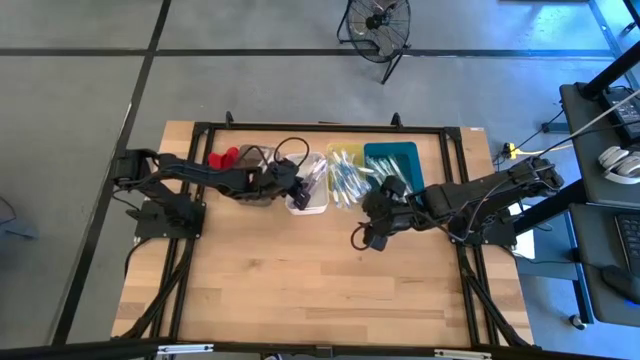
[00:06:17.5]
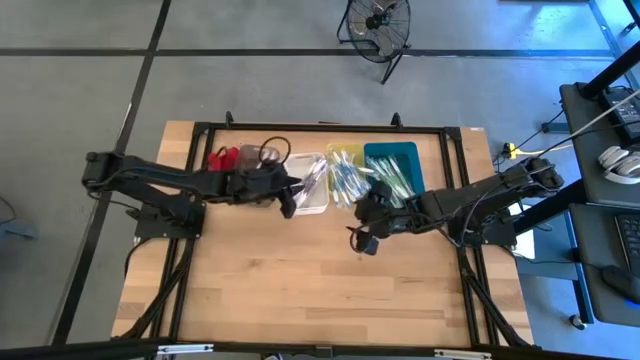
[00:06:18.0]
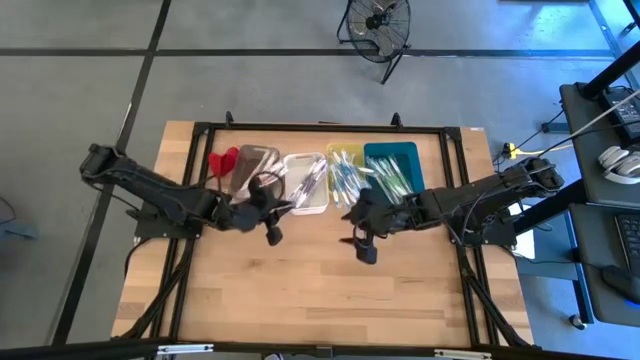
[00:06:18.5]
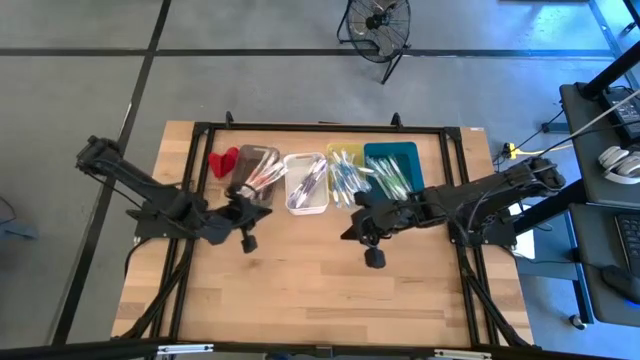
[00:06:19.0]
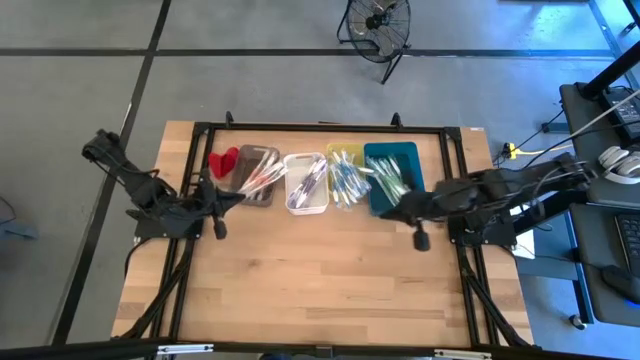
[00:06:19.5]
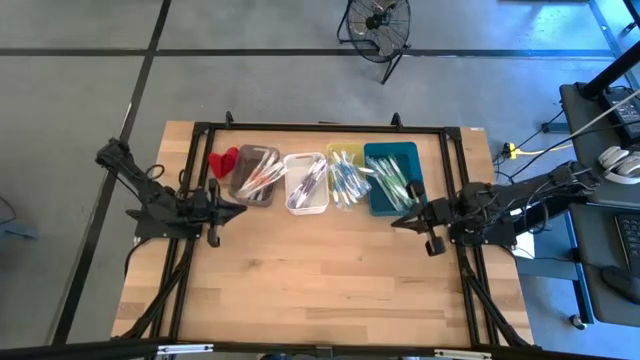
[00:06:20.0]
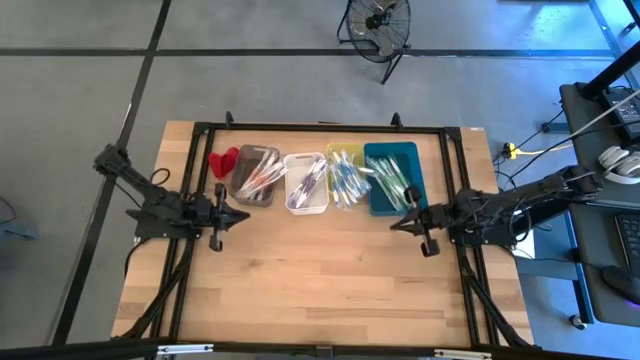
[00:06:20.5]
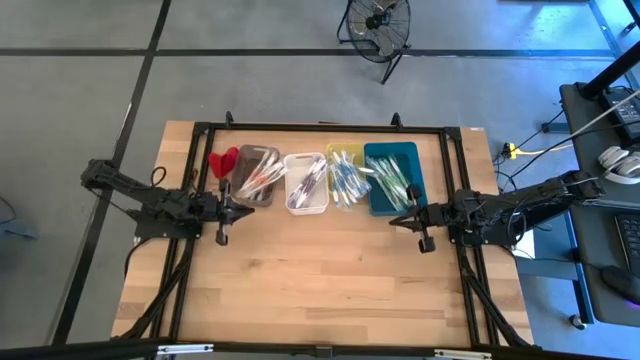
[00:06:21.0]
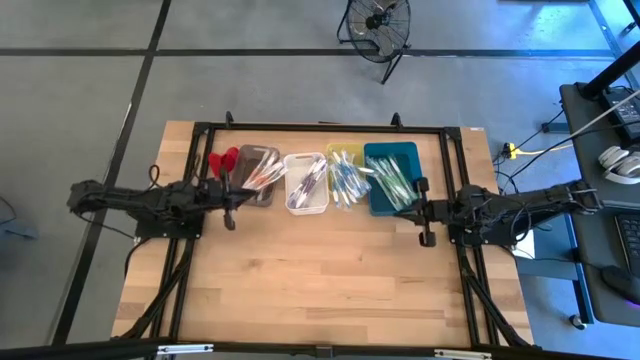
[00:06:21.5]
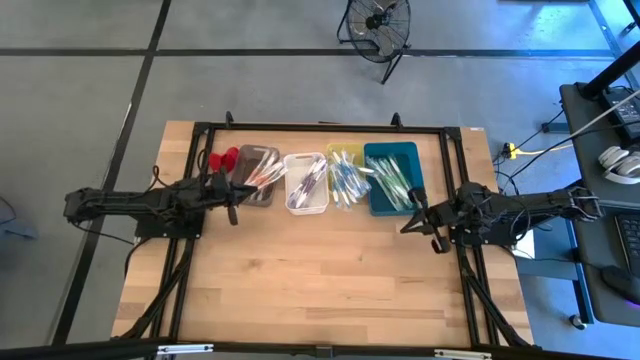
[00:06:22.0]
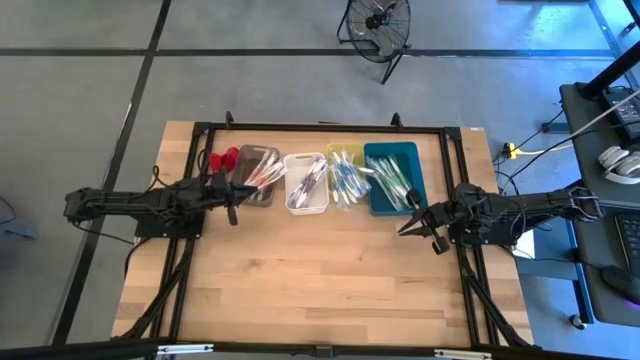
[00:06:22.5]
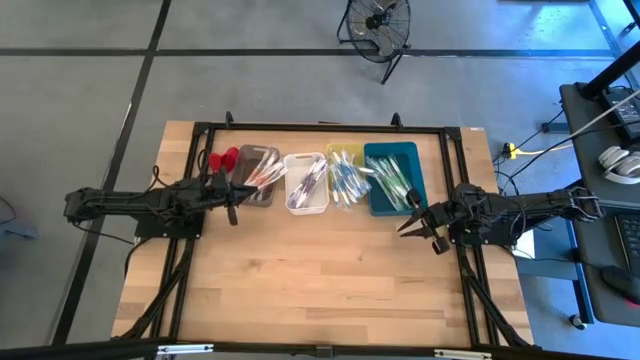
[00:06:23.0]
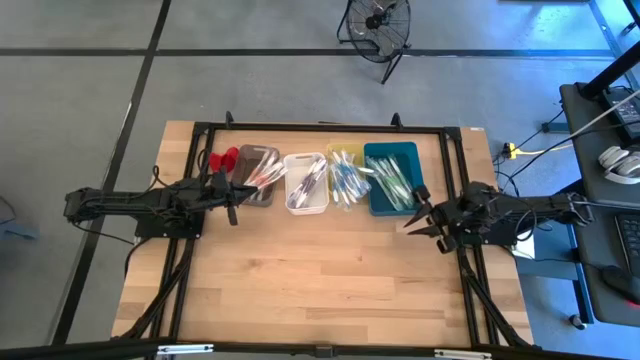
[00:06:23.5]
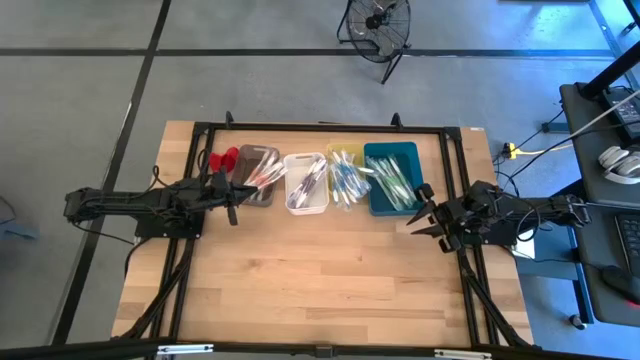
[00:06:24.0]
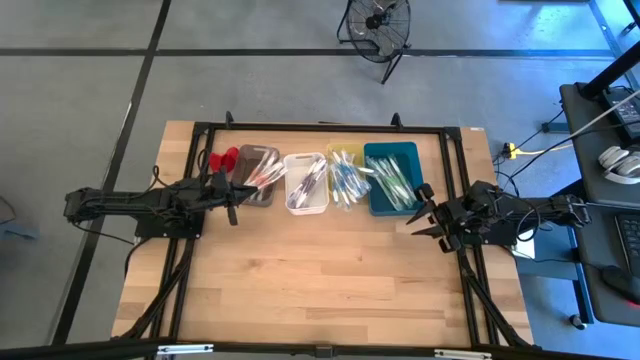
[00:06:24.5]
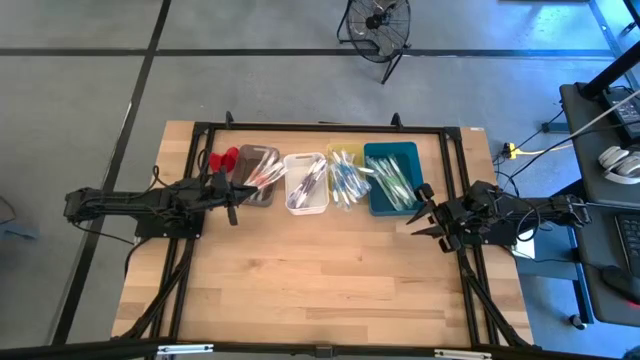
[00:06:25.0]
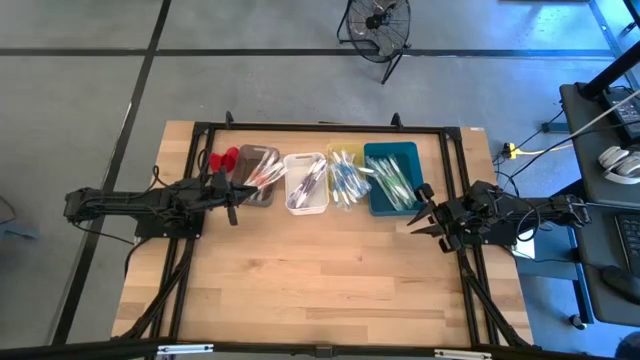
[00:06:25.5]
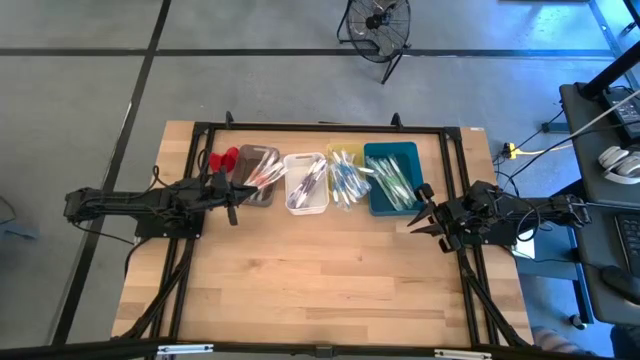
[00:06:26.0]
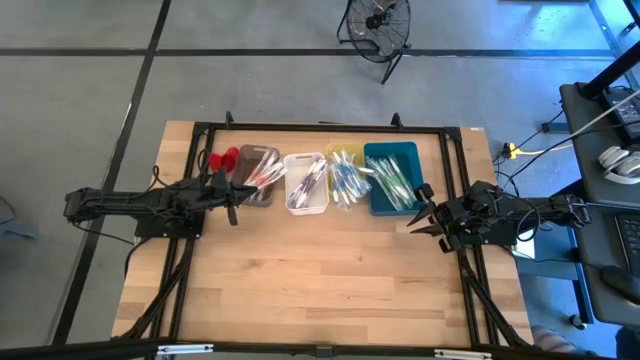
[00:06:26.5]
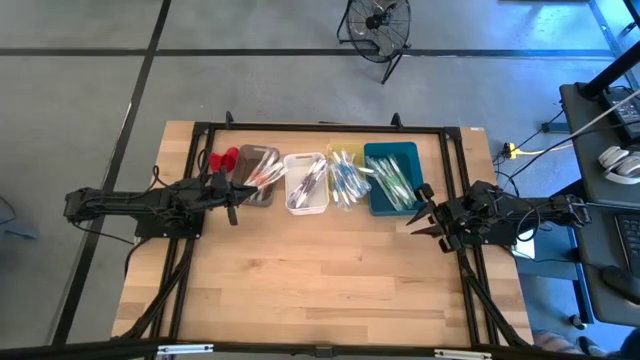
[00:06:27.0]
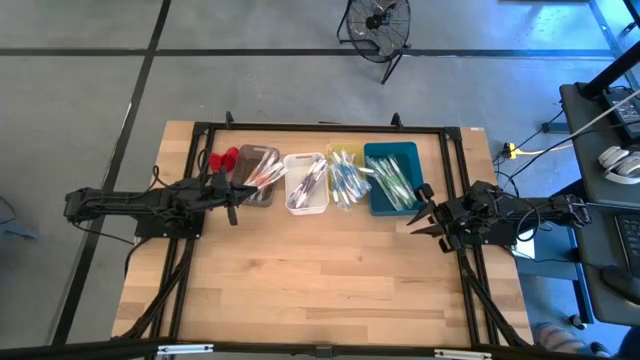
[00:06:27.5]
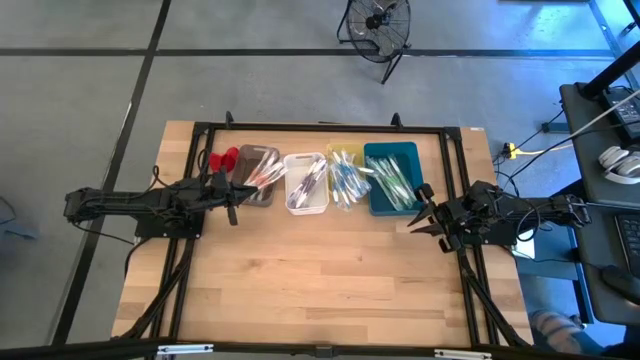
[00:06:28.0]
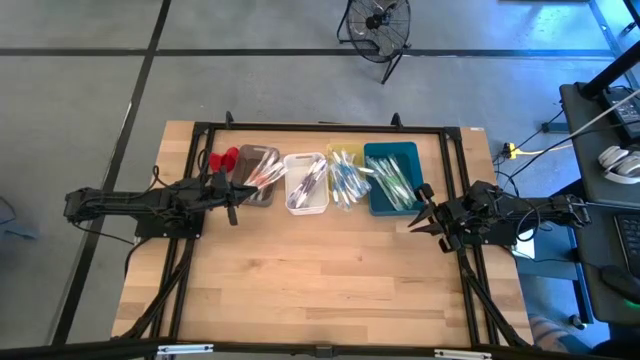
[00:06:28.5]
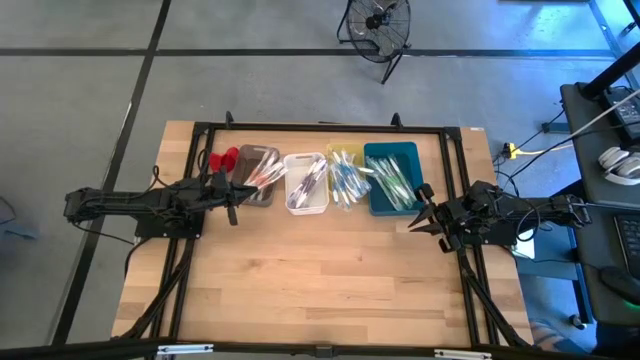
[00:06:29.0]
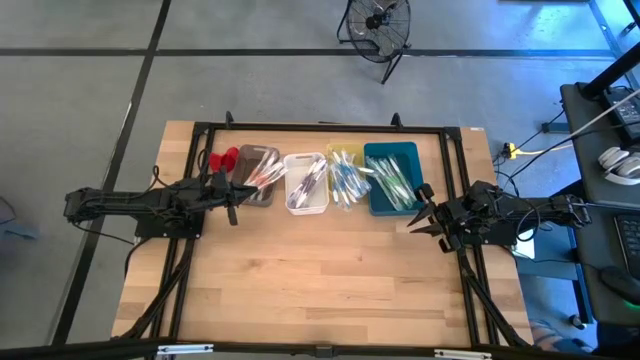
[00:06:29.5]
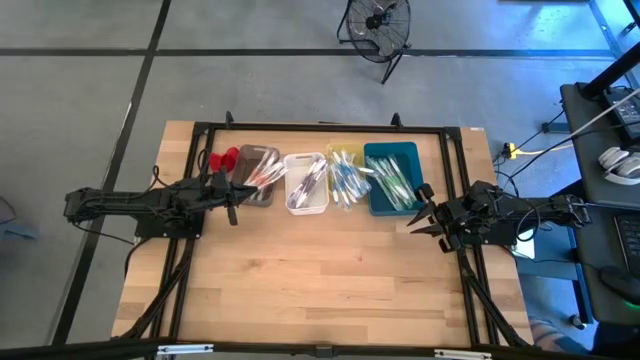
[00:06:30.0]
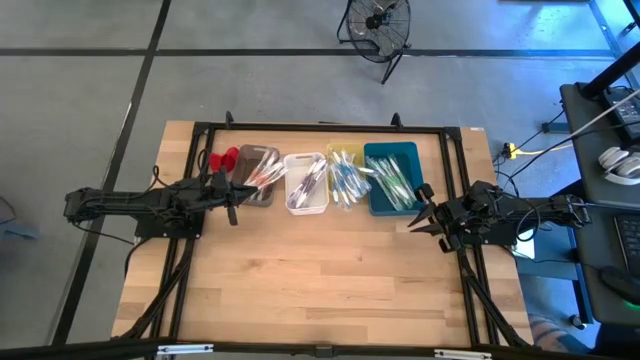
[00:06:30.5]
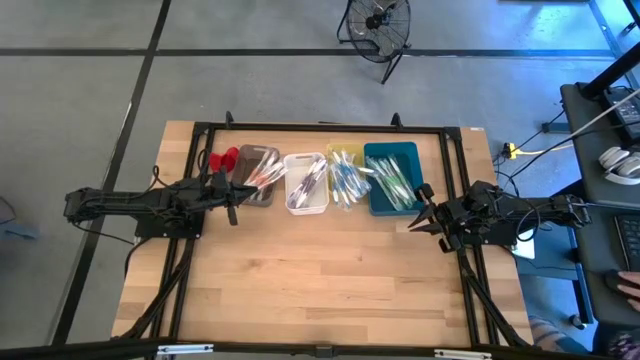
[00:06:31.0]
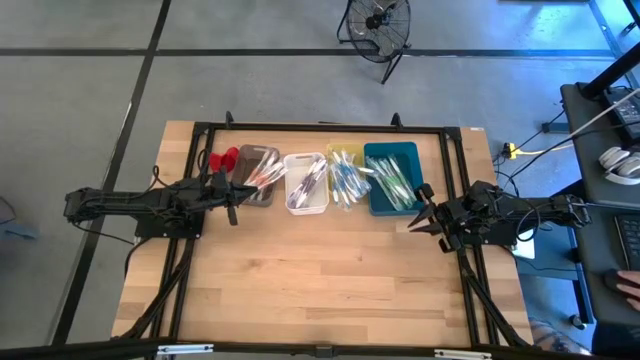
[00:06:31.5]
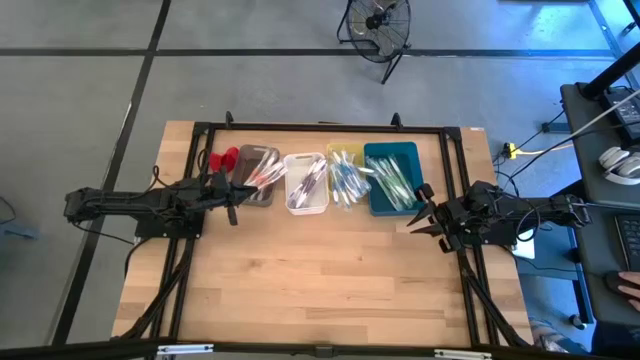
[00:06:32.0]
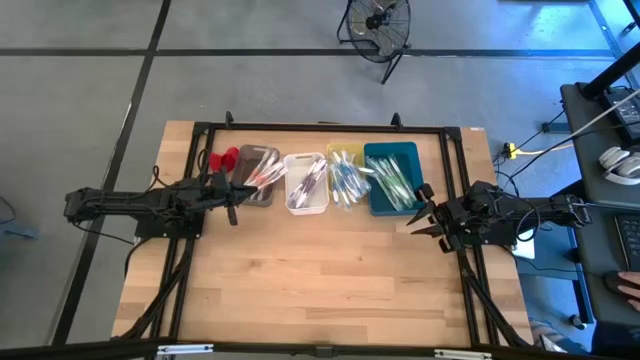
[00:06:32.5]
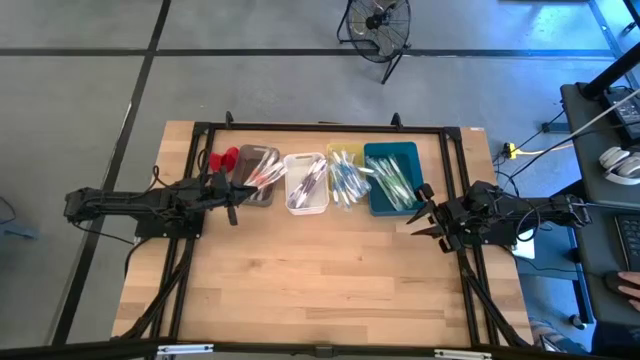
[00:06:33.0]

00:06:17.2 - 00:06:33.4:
Task: Pick & Place Toothbrushes
Return to Home Position

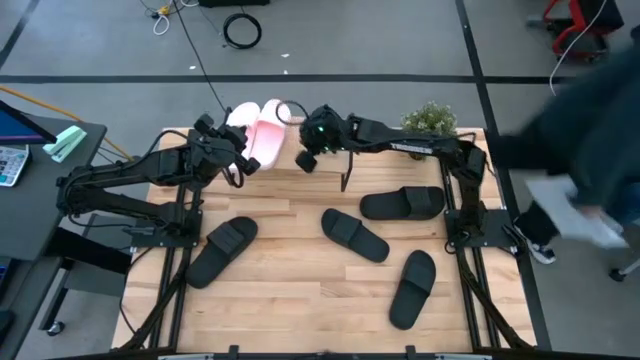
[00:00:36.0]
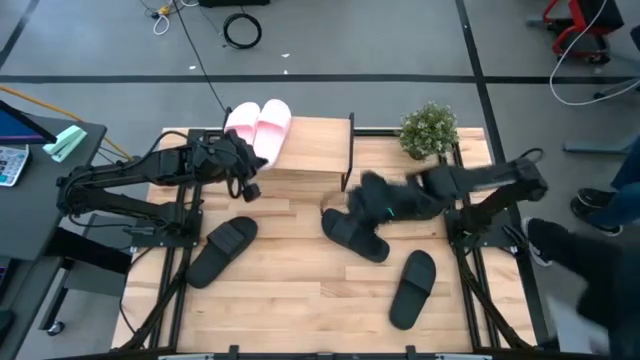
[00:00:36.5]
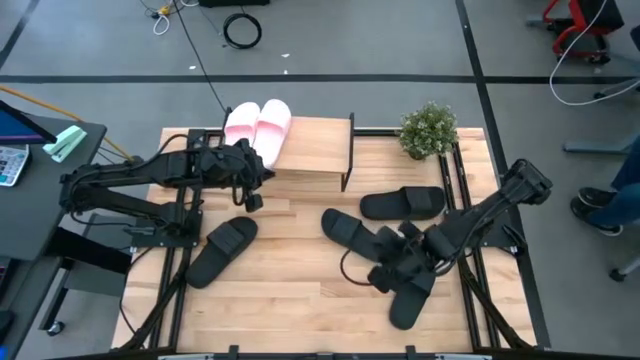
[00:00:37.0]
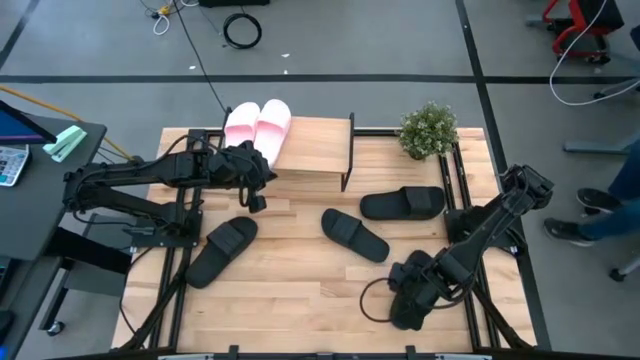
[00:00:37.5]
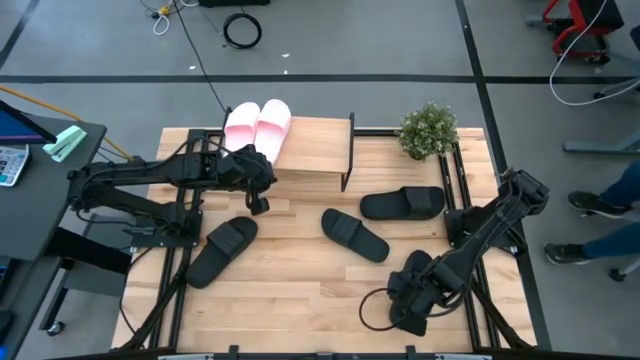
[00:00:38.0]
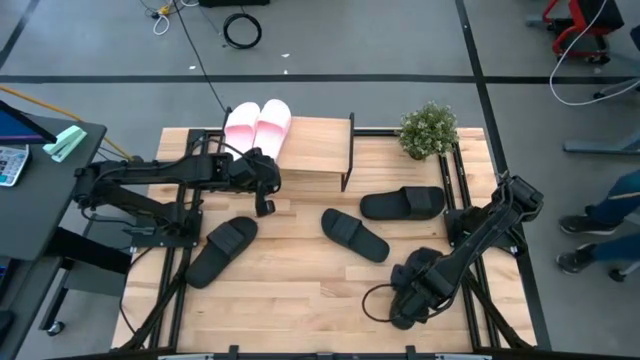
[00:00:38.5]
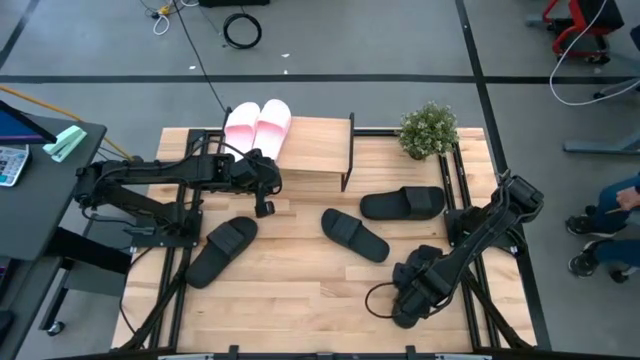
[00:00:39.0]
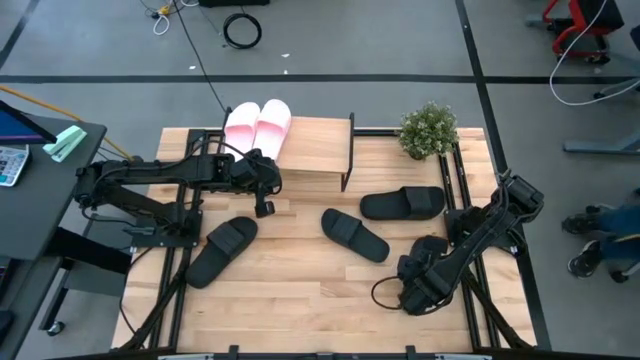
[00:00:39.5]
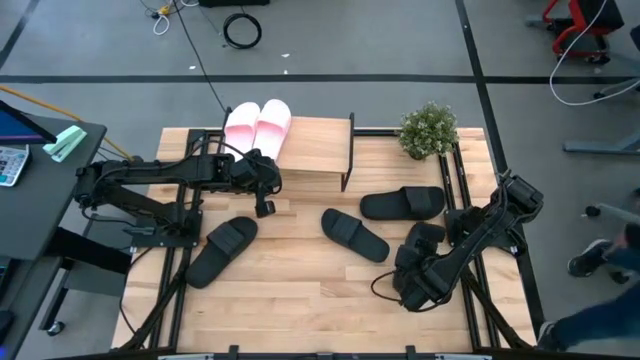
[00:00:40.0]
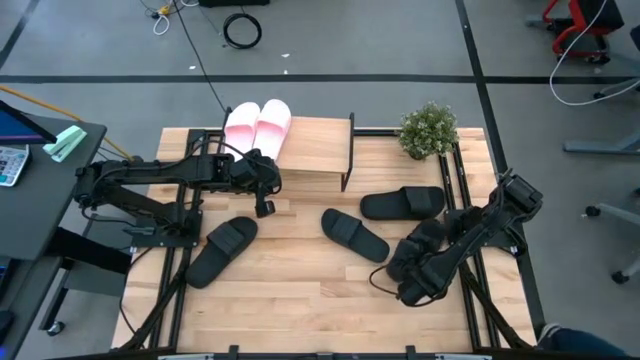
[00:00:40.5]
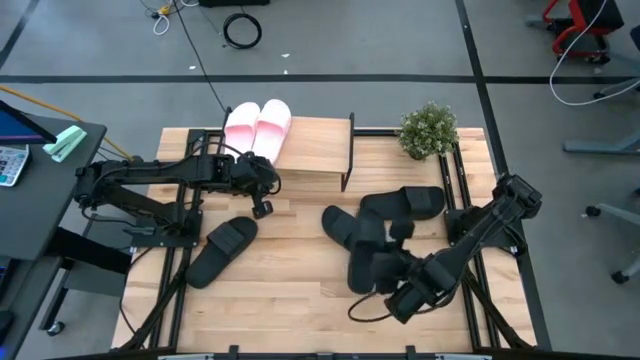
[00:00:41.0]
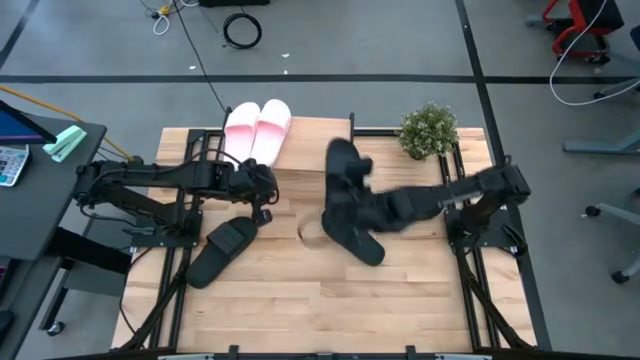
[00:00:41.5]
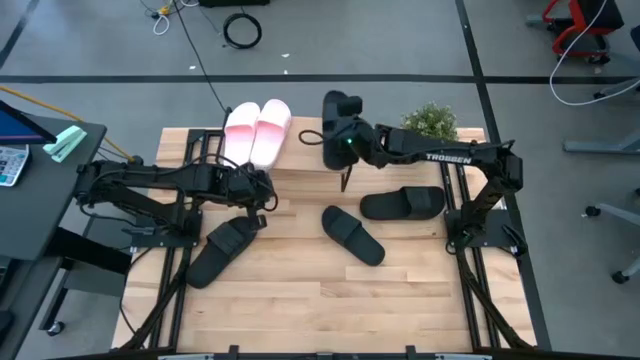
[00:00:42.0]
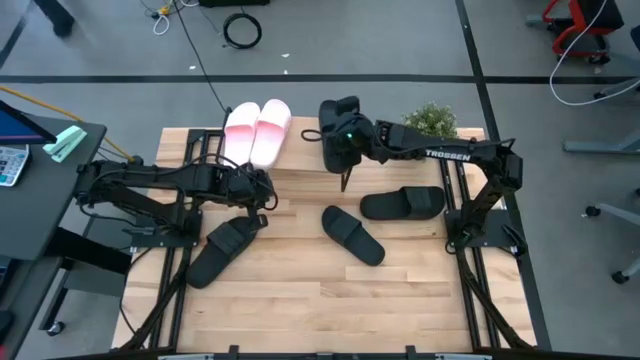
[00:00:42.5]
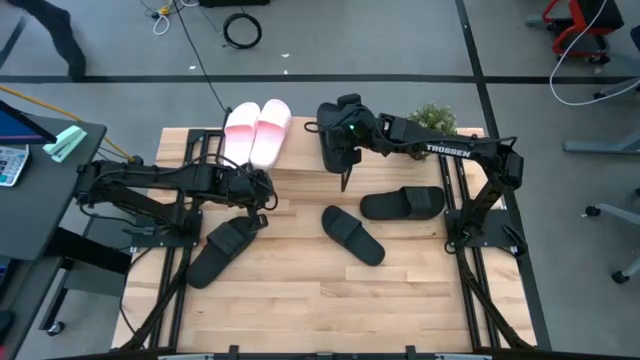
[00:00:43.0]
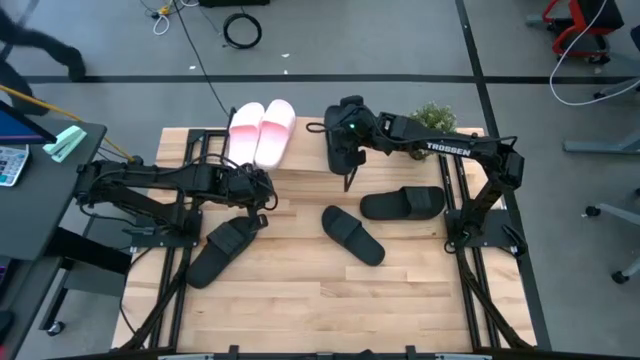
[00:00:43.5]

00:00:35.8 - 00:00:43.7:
Task: Pick and place slides into the shelf
Put the black slide on the shelf
